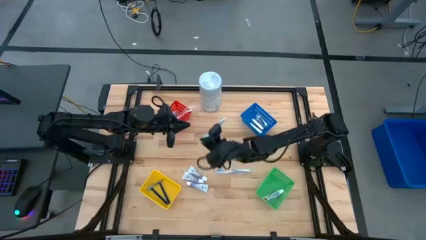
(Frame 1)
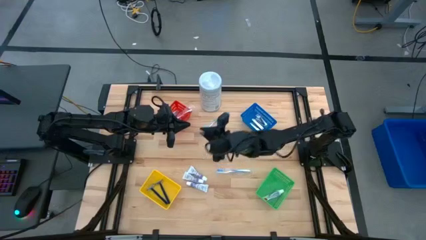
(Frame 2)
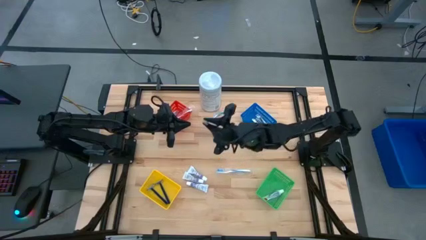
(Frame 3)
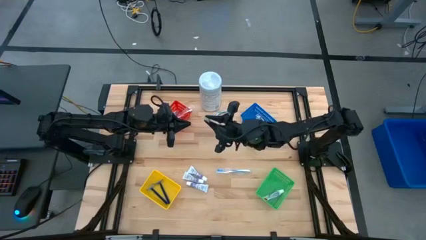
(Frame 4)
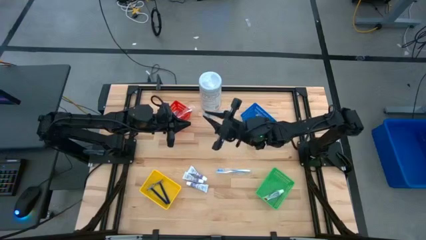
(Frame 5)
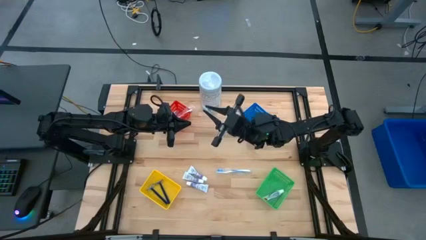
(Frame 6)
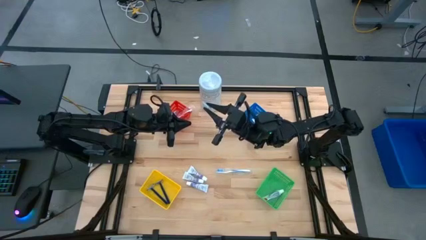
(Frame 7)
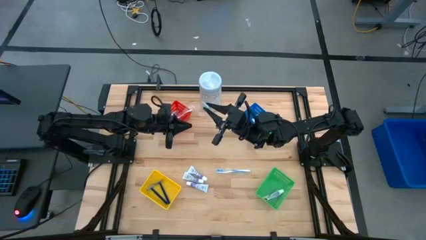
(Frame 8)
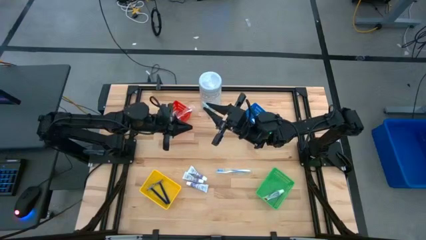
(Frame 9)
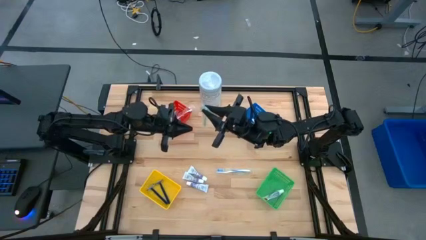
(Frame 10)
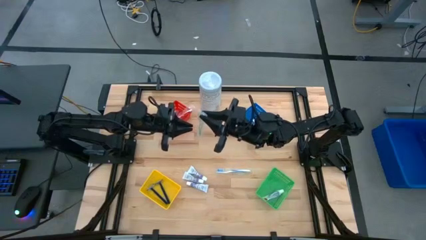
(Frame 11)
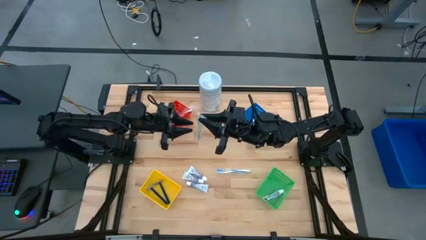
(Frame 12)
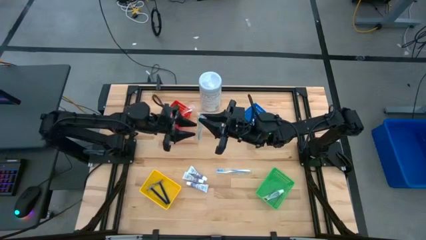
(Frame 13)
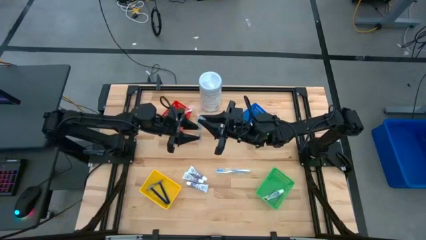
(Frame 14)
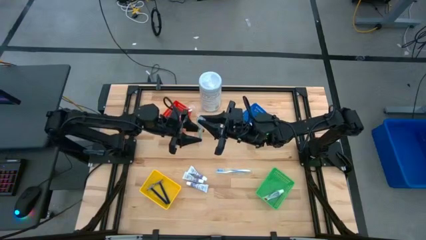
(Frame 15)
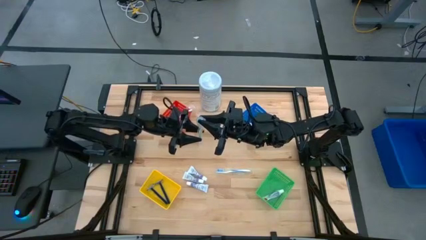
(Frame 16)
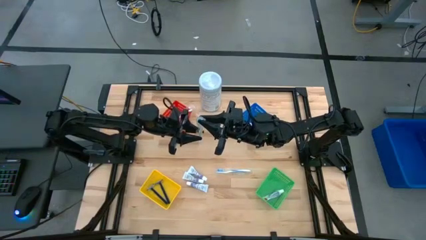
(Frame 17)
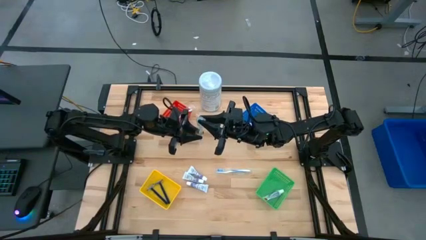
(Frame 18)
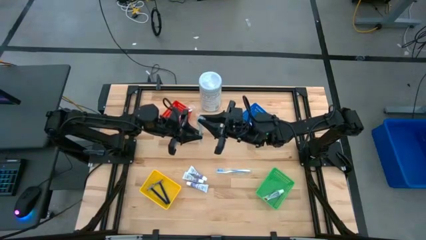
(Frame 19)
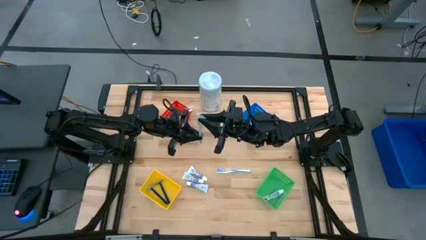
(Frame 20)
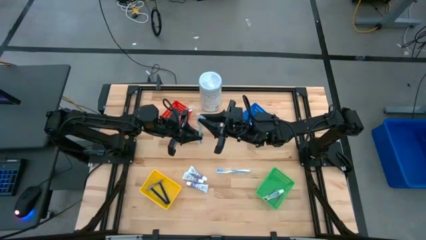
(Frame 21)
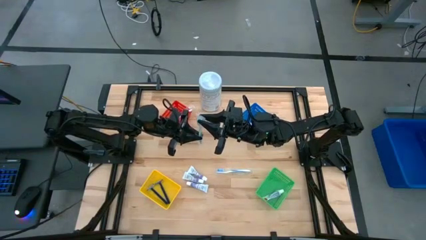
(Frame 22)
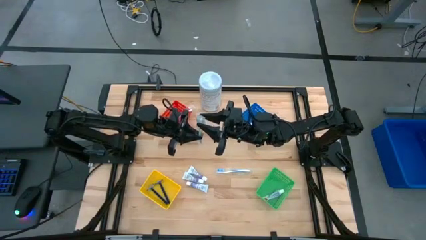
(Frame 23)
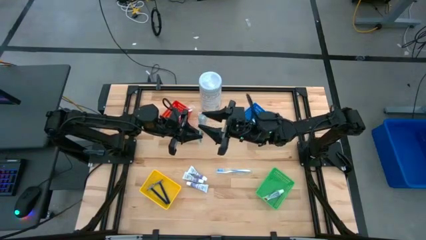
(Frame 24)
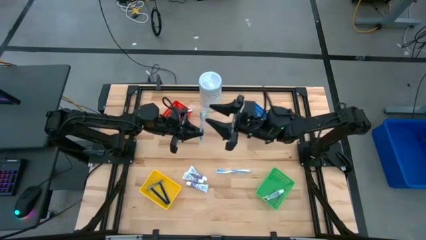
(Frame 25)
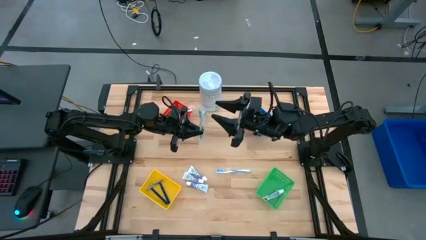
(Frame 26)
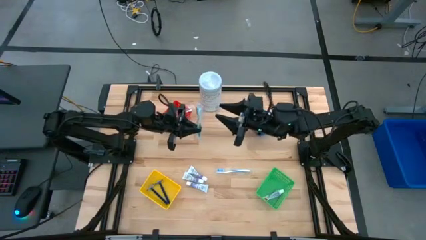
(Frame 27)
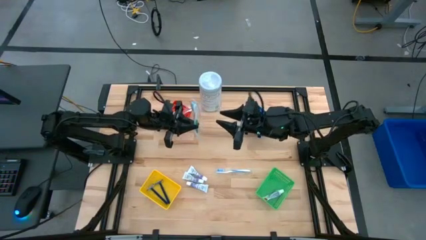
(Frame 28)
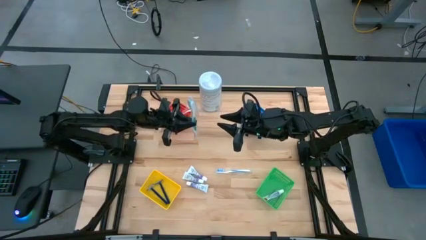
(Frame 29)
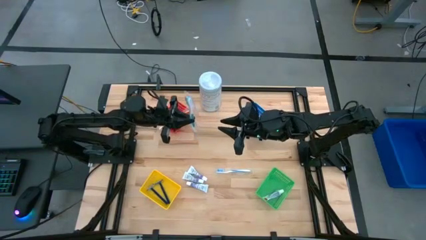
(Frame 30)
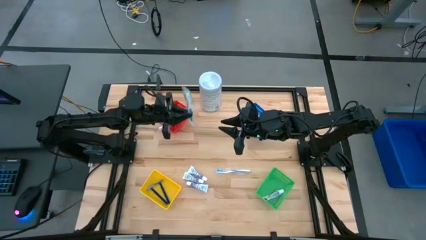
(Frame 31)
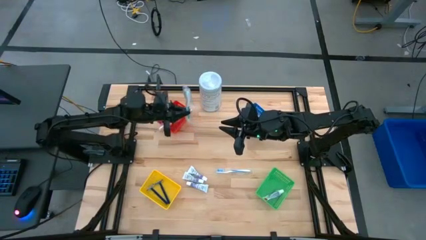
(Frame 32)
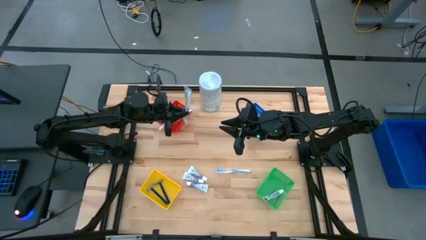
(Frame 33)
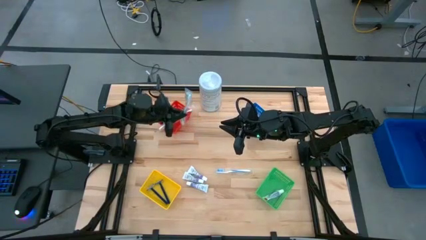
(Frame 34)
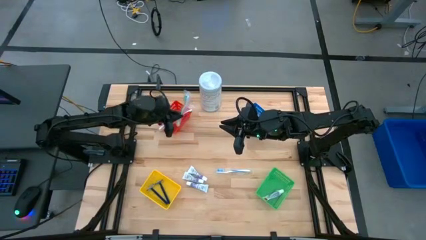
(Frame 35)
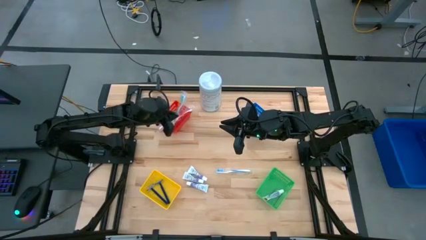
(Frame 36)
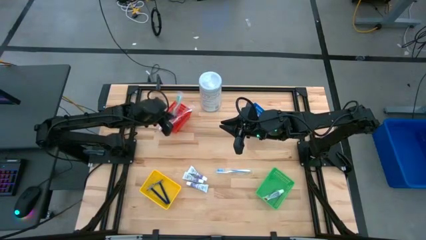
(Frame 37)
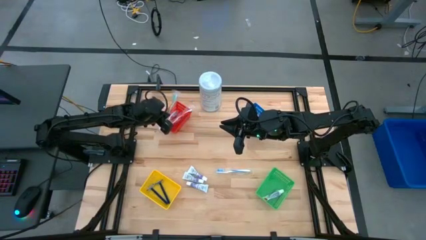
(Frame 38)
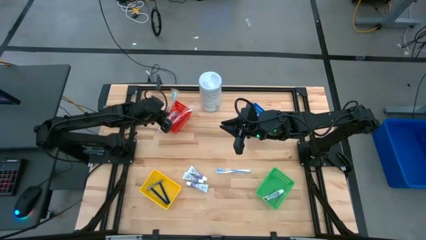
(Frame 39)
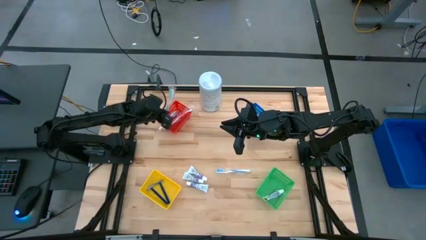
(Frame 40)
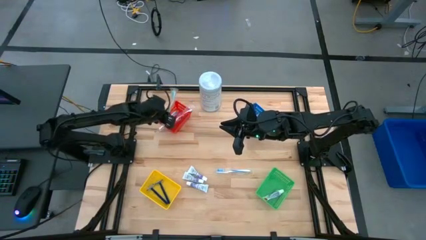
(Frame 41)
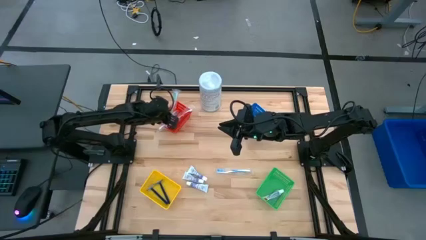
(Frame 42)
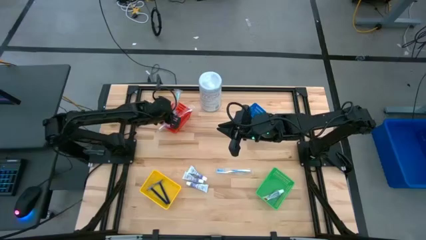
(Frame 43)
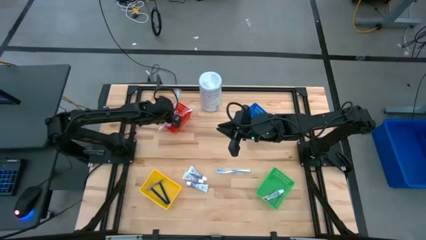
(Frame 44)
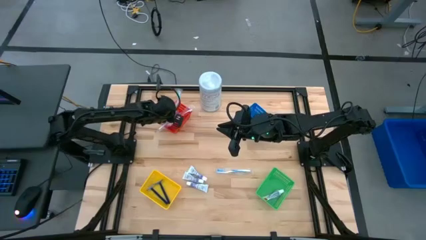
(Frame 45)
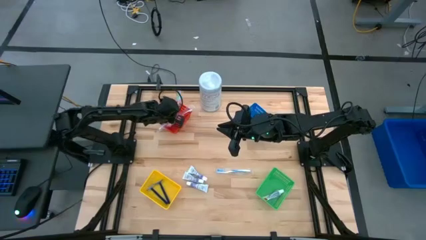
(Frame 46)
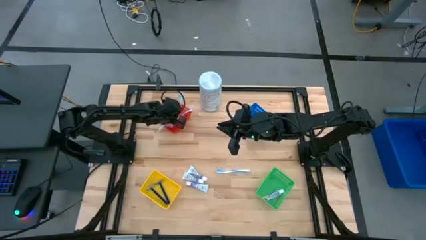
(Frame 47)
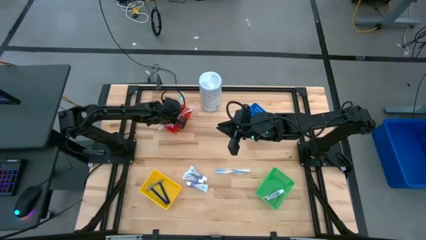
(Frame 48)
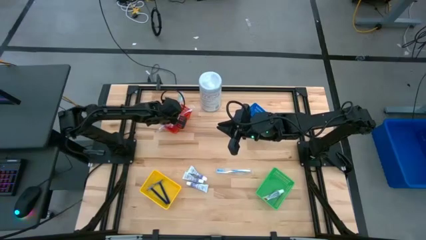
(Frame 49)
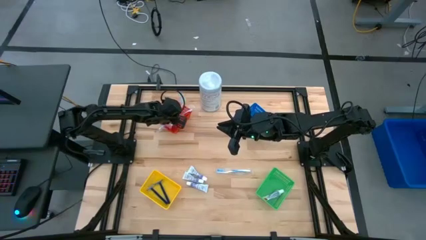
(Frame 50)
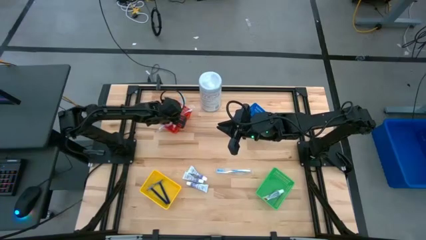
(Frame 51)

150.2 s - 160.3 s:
Task: Pick & Place Travel size toiletries
Put the green toothbrush into the orange basket

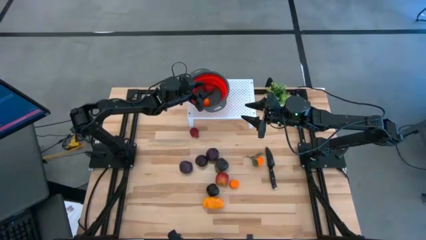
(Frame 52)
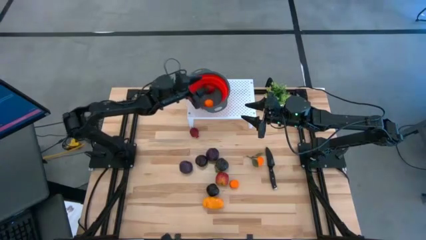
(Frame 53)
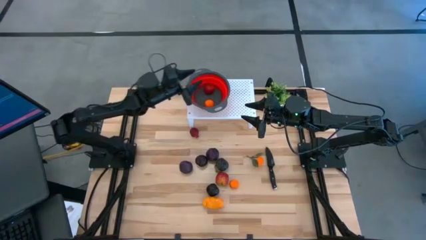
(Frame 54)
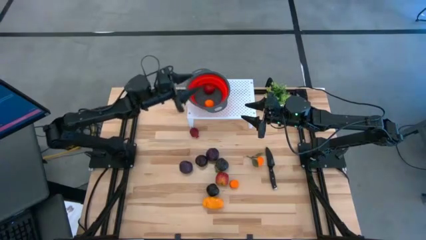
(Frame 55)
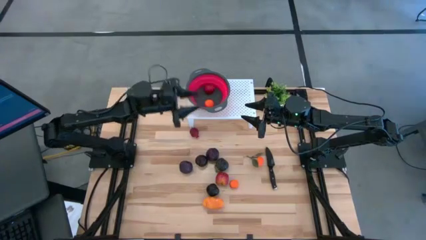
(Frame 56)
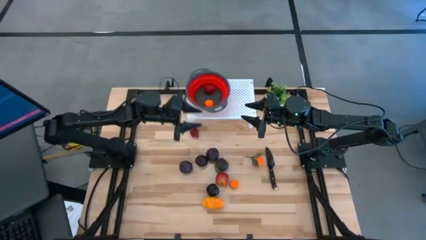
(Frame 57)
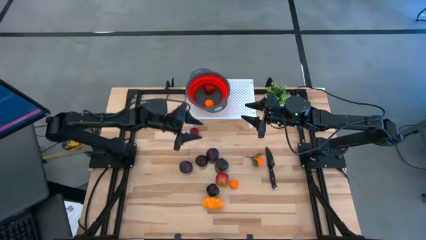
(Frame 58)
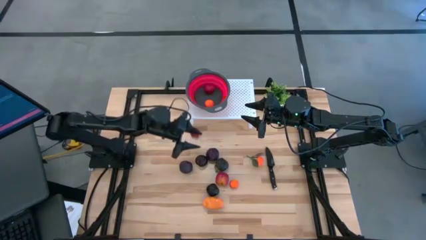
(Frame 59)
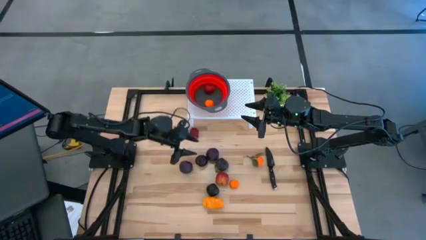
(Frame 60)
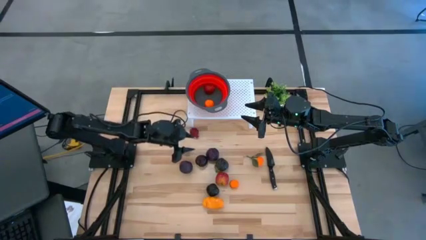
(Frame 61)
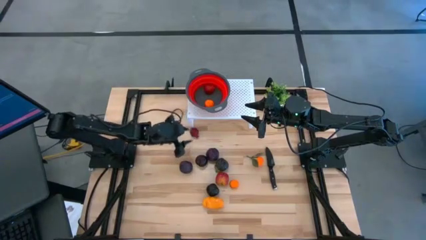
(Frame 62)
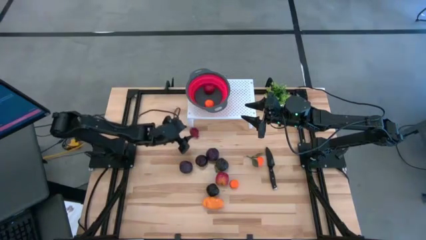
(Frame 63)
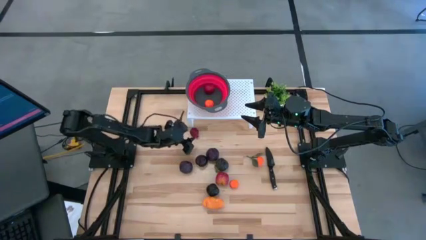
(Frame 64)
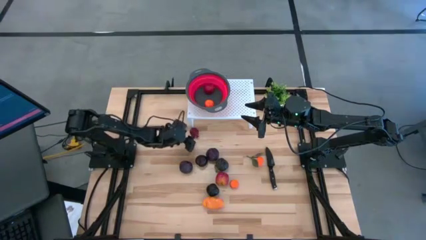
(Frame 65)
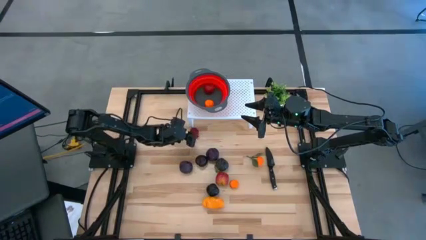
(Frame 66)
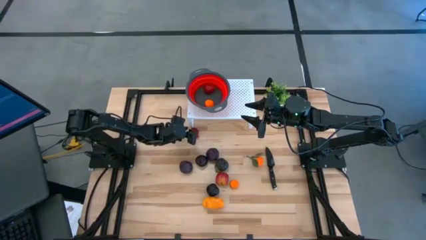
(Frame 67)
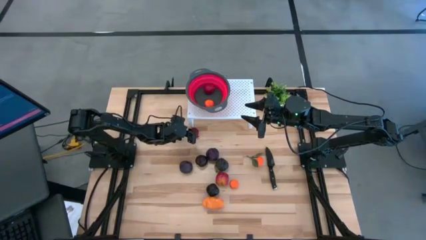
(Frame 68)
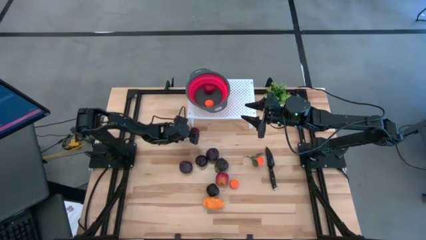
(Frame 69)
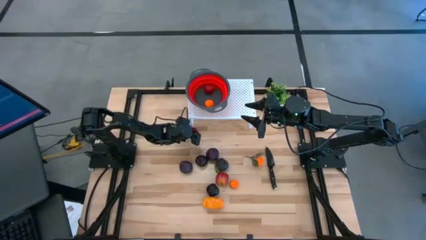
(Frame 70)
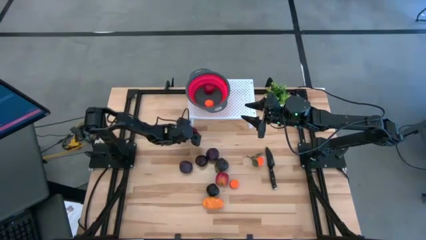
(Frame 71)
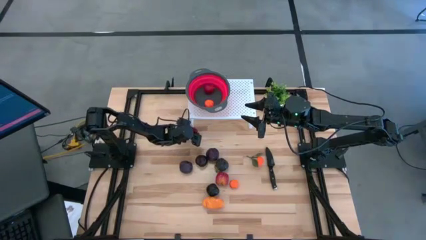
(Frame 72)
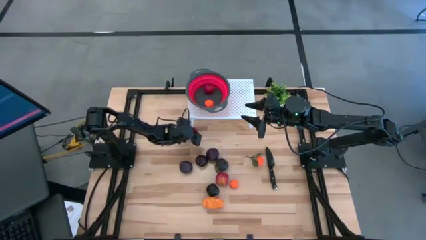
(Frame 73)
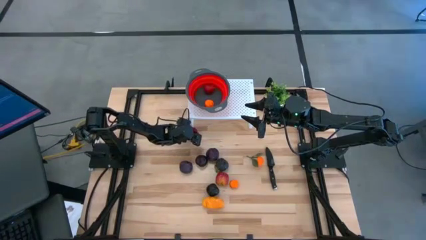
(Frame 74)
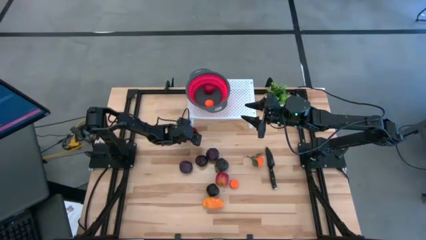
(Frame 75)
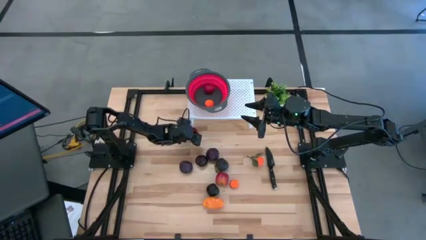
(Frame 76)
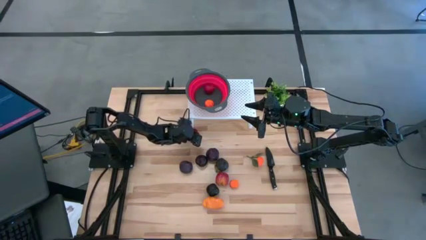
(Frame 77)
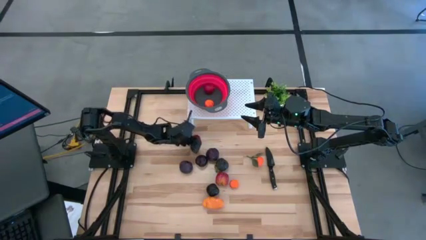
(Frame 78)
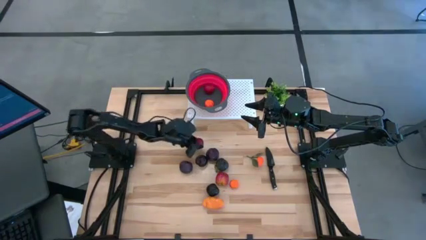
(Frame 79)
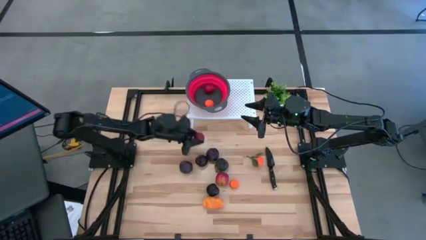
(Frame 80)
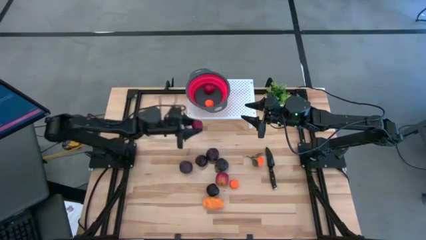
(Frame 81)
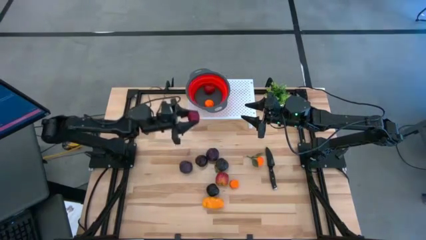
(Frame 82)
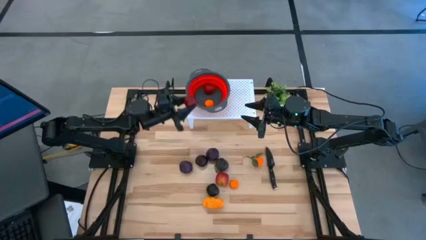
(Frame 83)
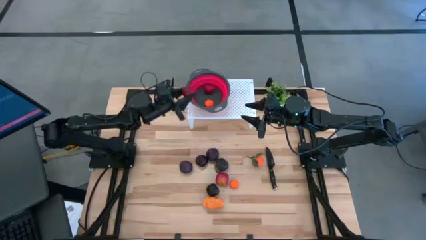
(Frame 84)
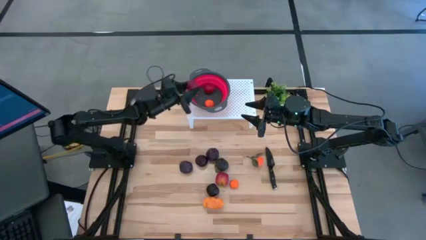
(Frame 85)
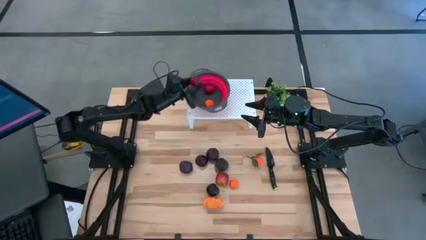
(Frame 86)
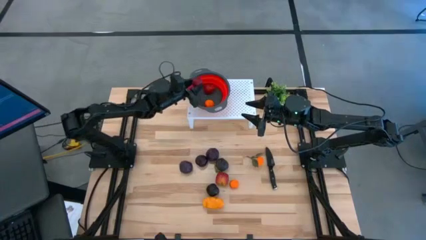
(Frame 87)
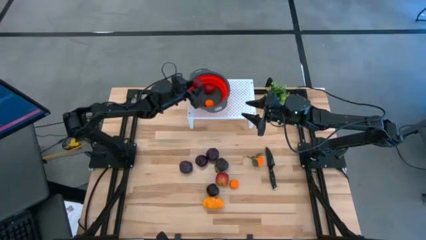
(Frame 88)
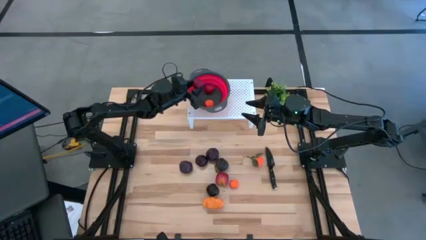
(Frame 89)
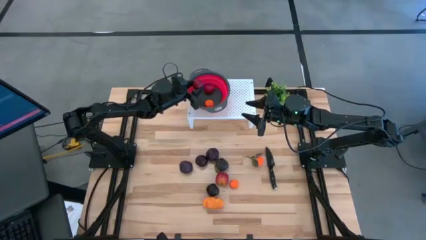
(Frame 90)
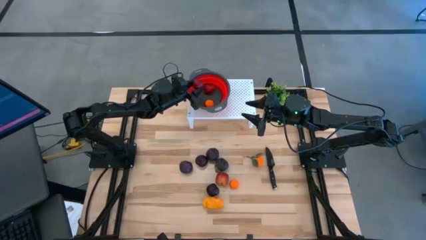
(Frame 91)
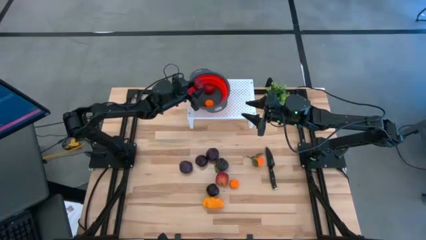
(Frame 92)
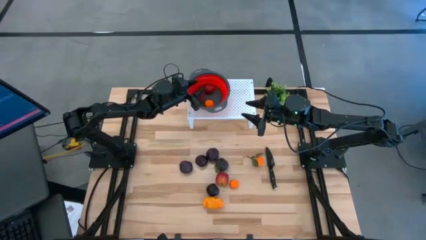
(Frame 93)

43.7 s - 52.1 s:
Task: Pick & Place Fruit
Put the pomegranate into the strainer bowl on the shelf
